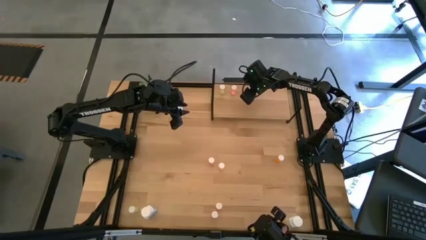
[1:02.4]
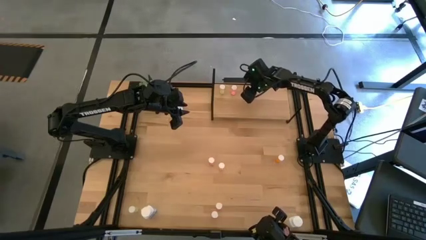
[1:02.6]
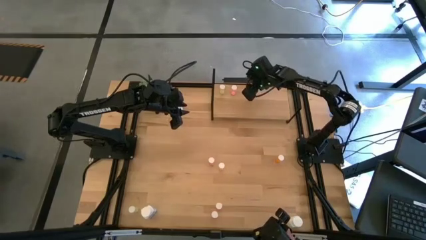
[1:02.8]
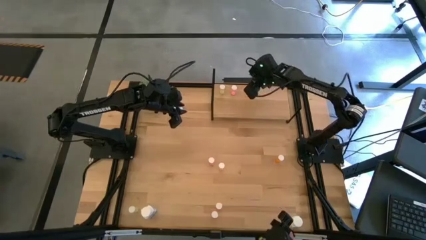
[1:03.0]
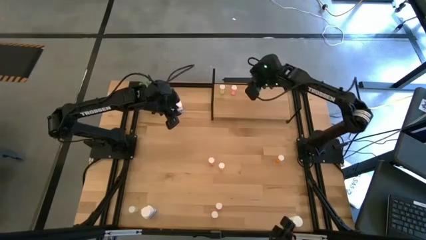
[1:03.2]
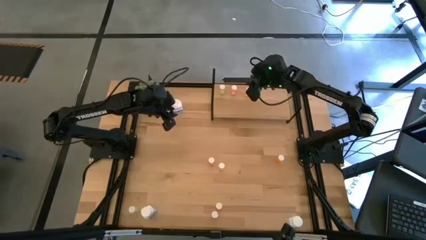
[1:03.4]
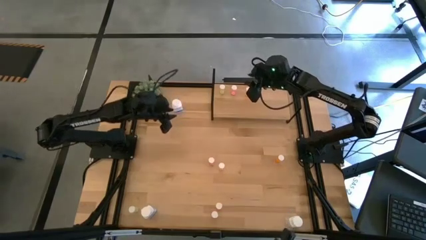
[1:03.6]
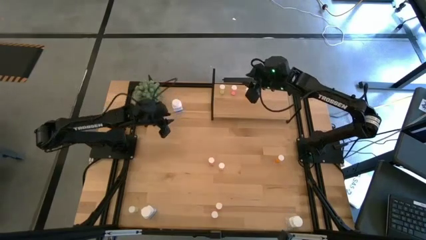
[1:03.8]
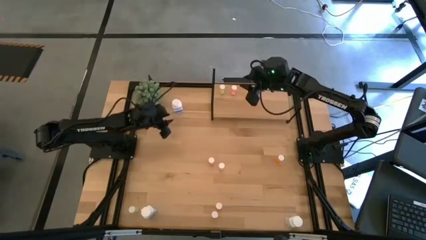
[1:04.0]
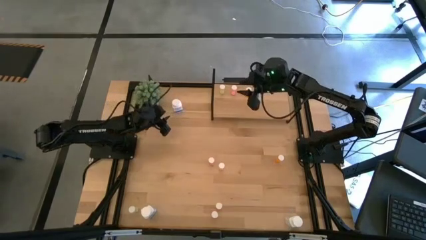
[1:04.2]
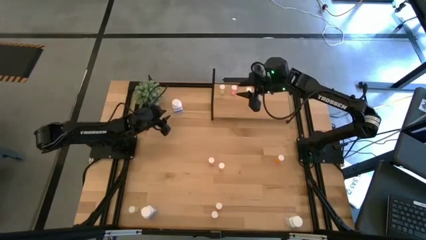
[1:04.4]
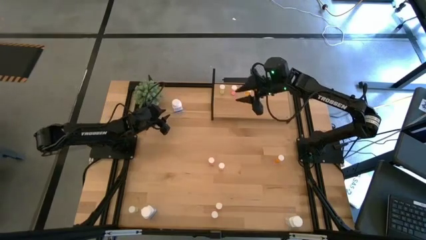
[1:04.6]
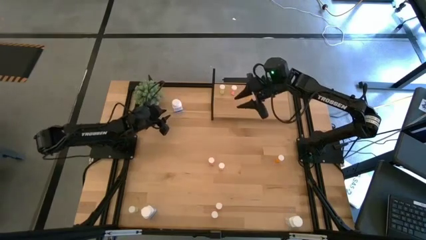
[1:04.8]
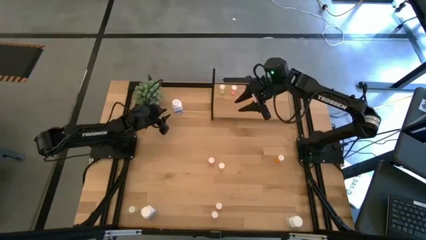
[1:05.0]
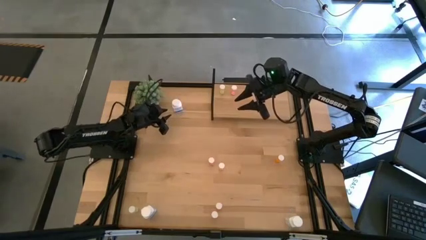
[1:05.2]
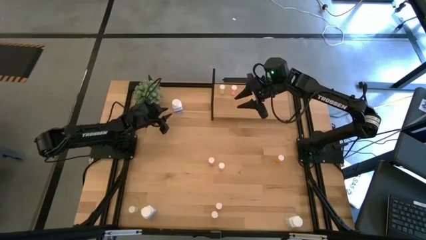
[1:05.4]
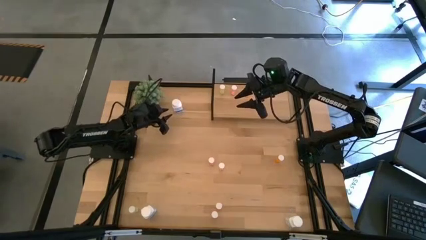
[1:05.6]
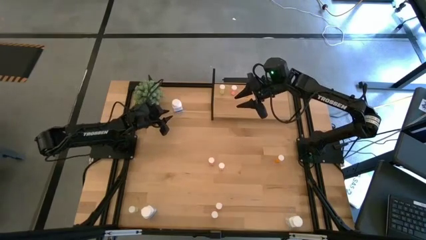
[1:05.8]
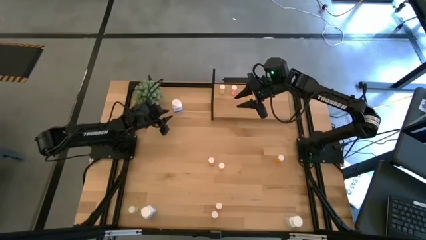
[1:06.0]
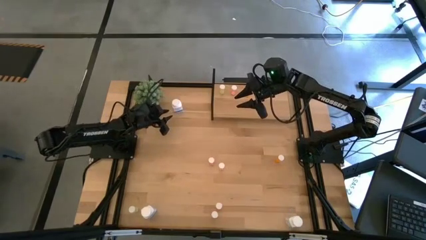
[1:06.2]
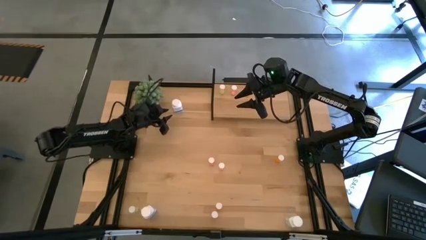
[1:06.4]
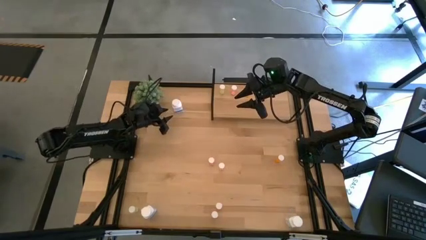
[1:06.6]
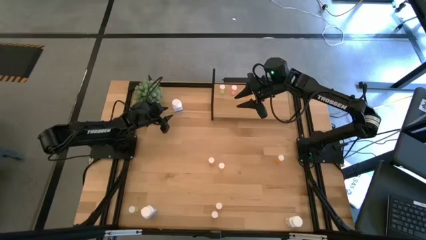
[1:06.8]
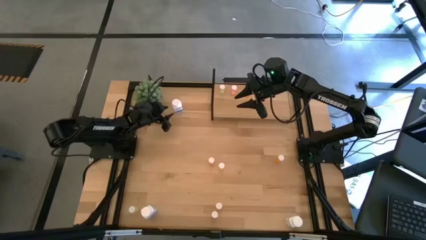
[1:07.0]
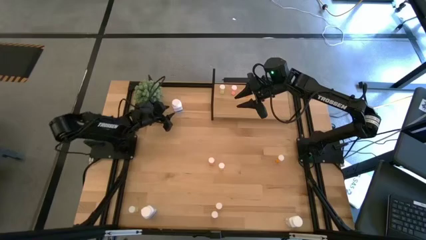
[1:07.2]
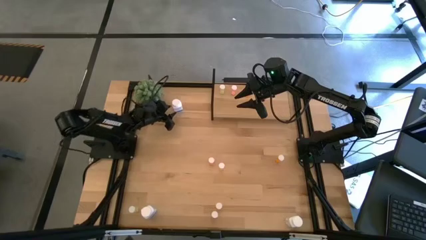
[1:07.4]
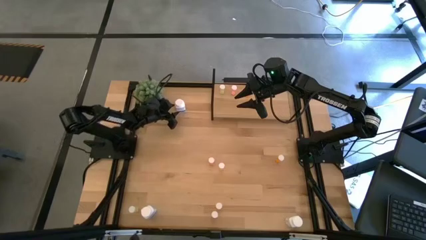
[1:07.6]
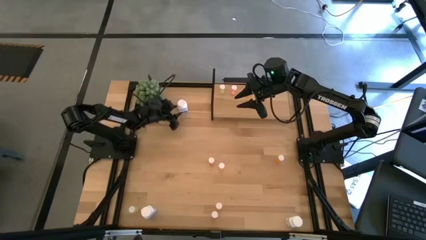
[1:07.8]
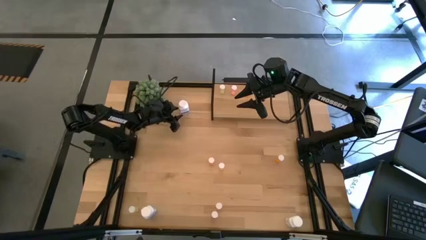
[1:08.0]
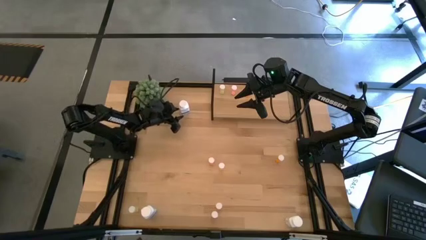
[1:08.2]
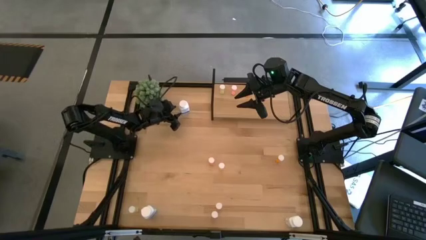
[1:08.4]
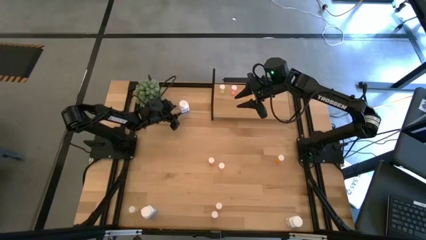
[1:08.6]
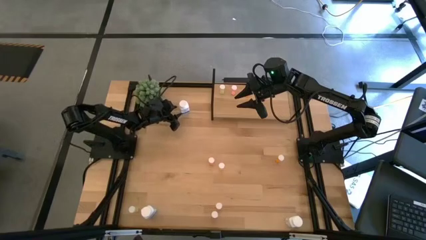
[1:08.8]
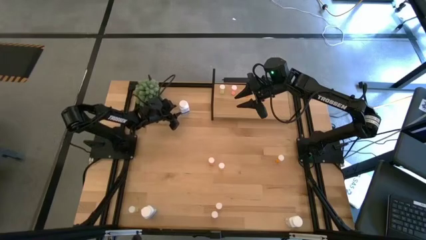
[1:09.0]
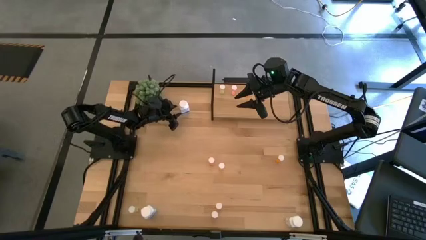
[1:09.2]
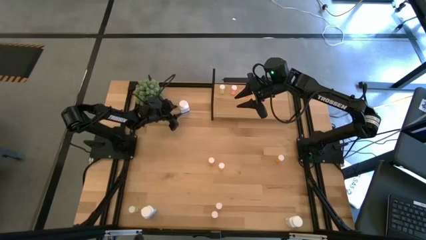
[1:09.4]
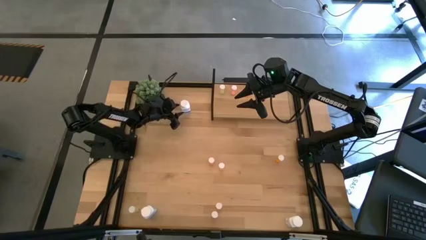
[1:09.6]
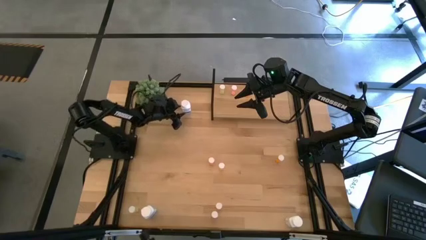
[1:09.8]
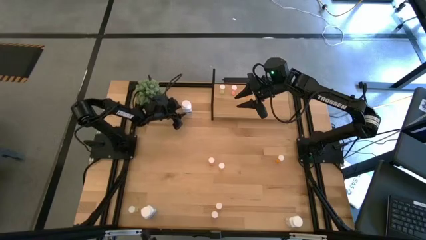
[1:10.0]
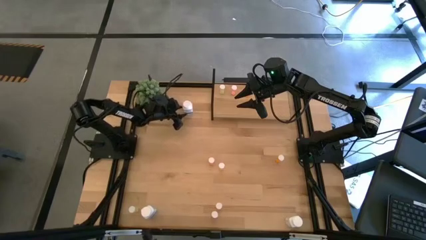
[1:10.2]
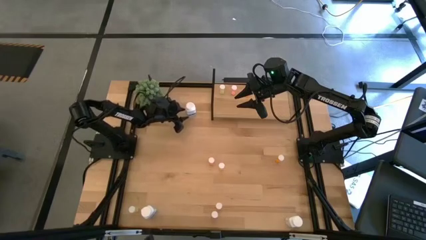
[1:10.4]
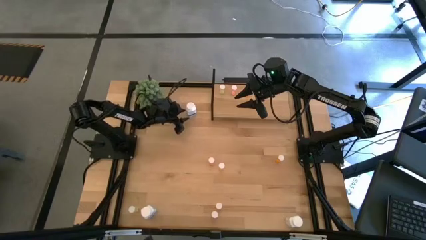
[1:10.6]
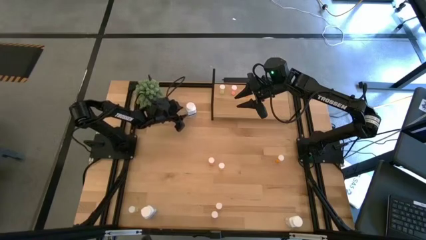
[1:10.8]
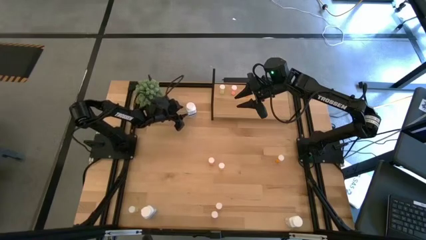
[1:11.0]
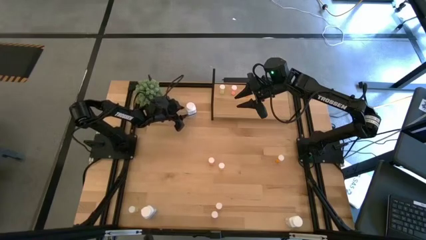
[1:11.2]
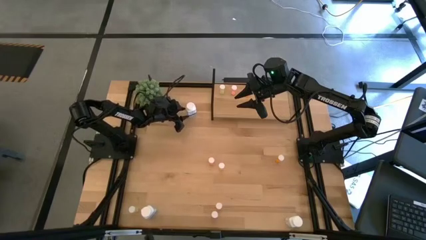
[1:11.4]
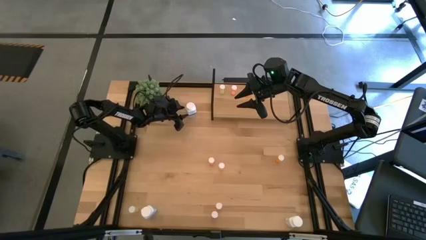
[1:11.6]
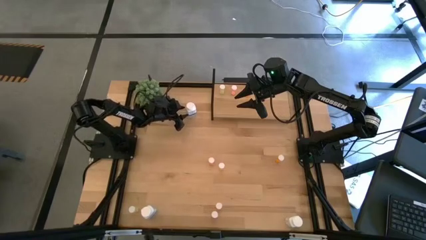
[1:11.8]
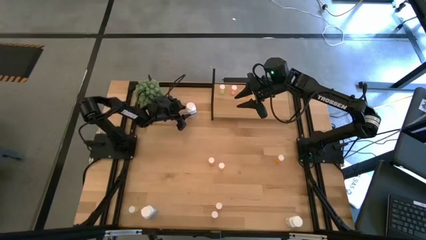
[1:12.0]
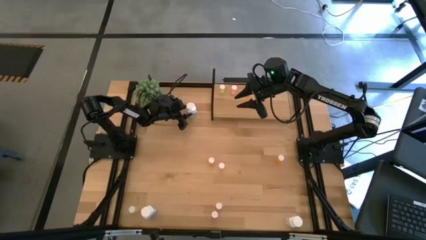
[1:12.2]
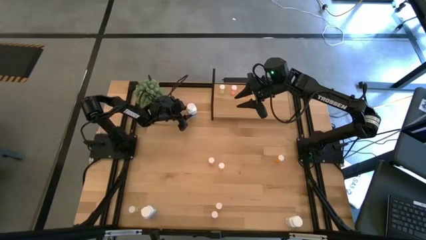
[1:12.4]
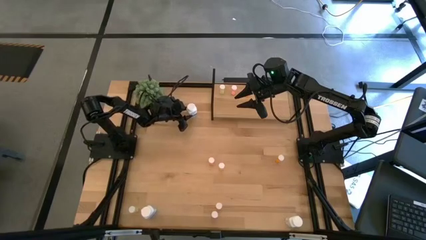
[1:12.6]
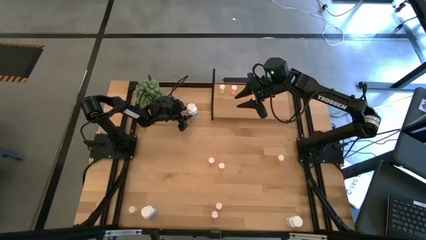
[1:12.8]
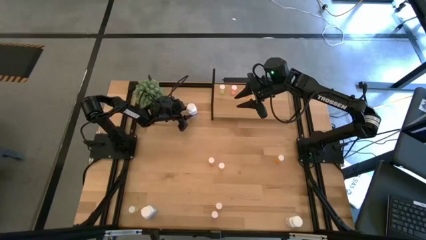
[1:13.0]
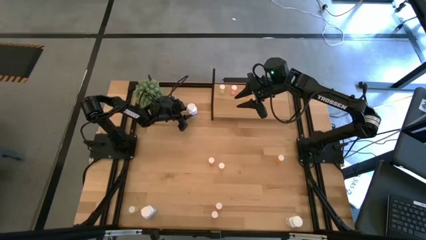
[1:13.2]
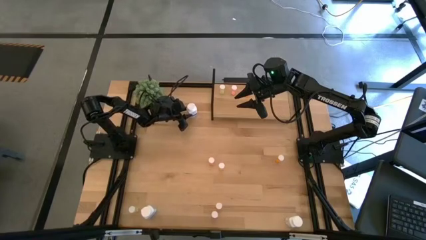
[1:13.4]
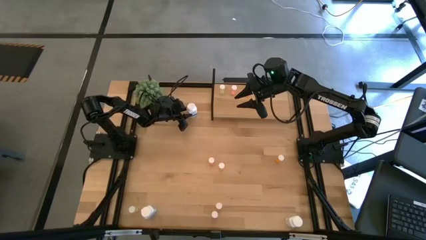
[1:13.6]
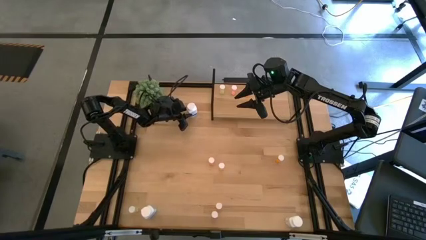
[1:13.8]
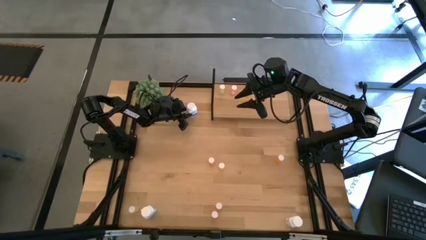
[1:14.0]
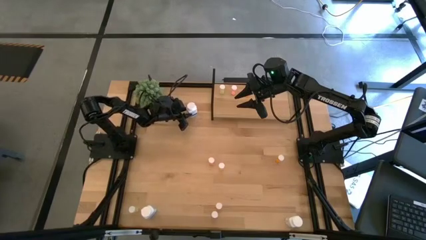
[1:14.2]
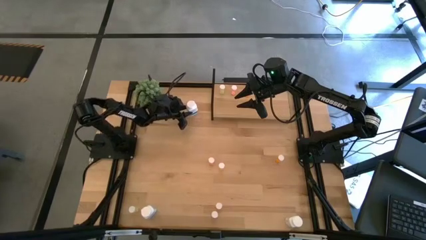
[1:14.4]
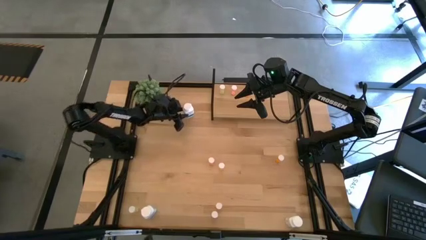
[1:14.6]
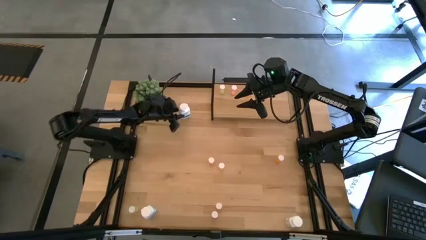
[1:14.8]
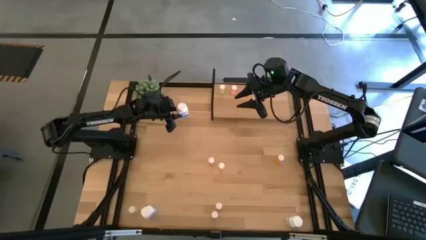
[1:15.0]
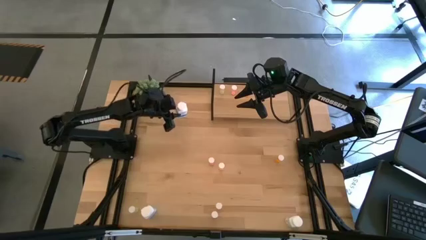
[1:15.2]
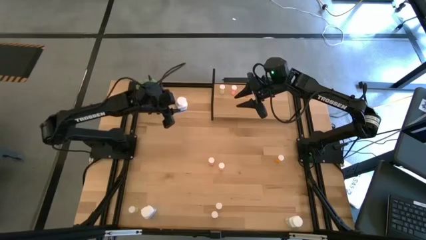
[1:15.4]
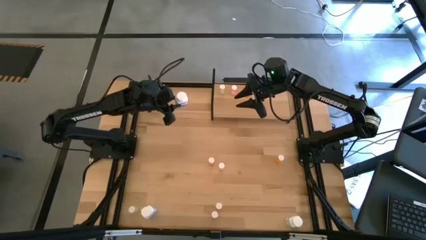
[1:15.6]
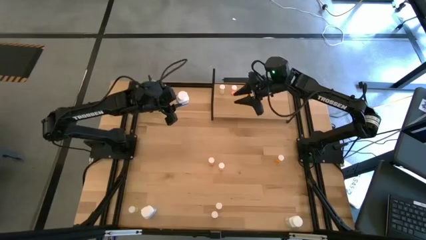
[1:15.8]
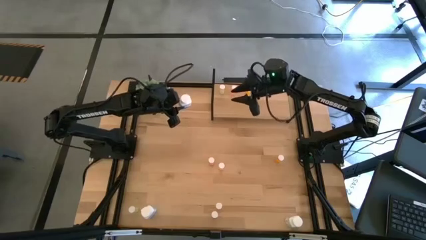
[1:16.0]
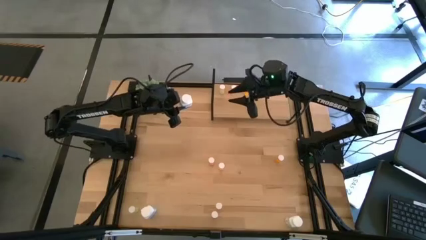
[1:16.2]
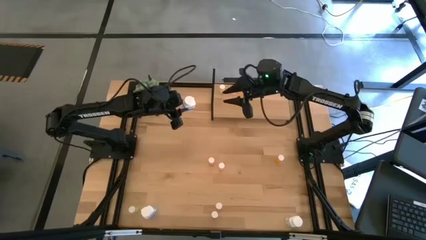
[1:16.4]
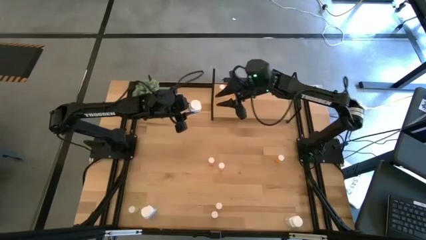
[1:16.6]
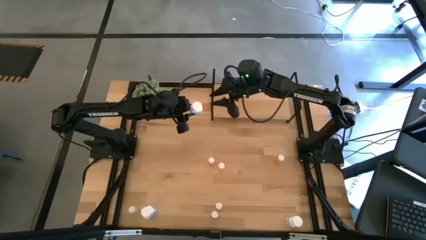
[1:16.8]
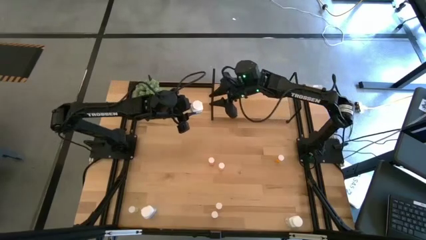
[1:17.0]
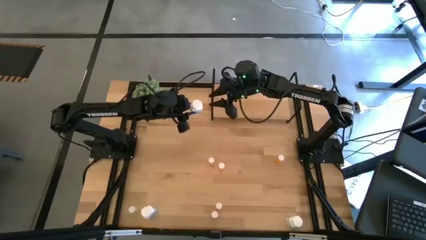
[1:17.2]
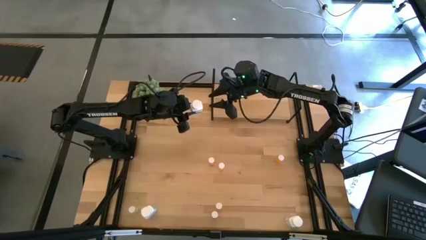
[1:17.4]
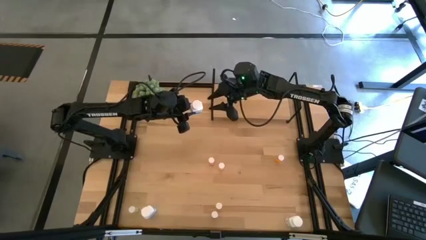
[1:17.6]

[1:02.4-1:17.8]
Task: Pick and place medicine bottles onto shelf by color
Put the top right white pill bottle on the shelf

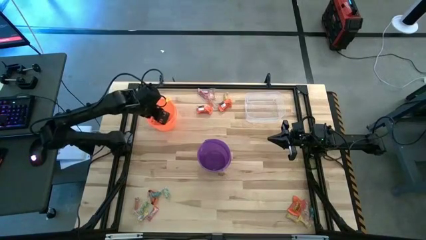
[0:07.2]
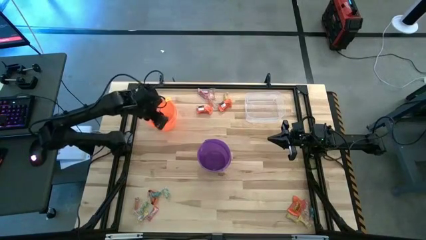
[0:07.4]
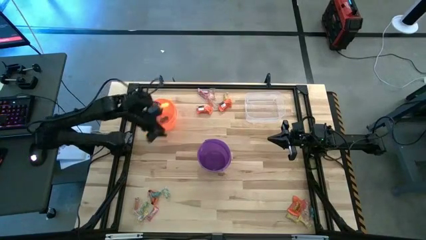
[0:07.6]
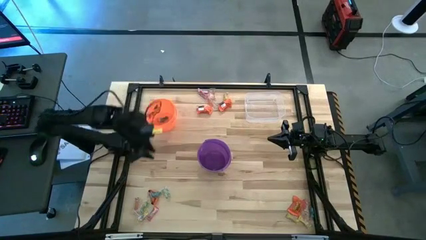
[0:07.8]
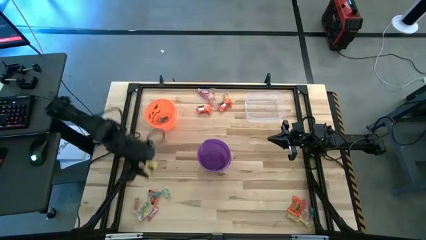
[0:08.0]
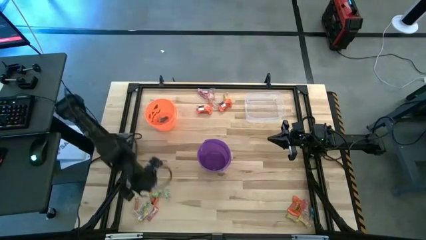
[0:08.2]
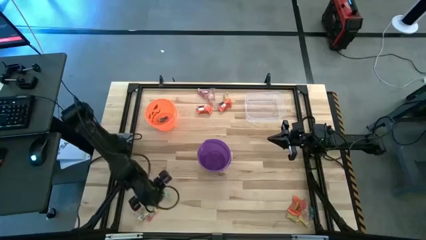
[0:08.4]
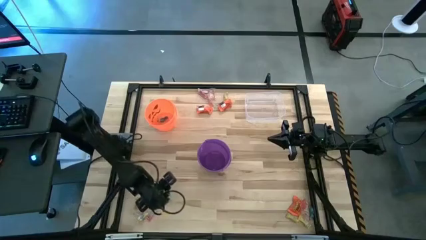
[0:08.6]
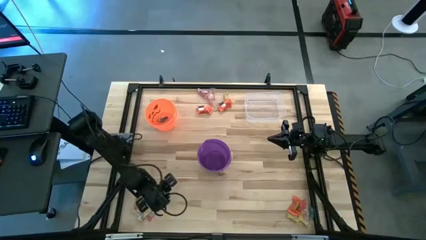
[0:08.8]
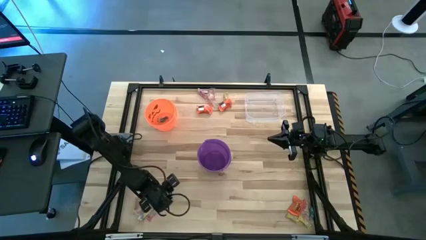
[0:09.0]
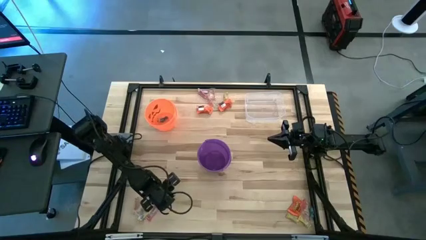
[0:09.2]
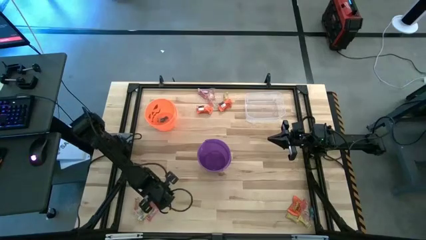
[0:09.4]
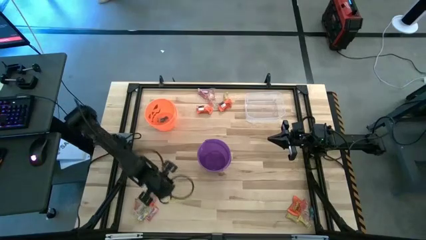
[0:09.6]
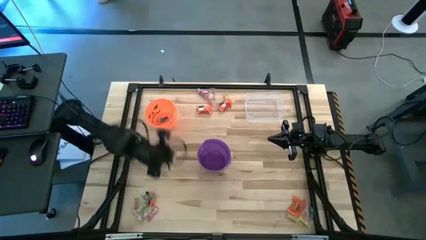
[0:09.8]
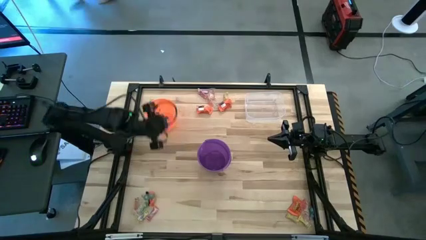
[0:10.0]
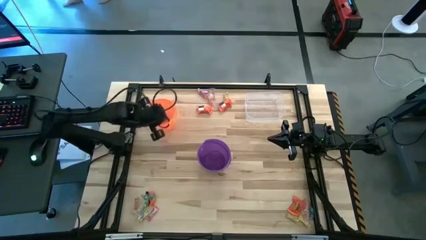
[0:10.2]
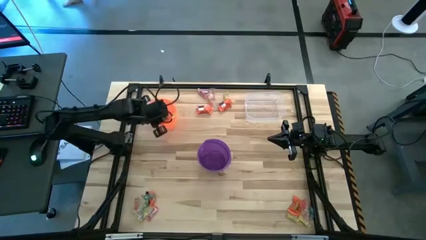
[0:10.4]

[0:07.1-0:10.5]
Task: Sort candy by brand, put in halloween buckets
Put the green gummy into the orange bucket
